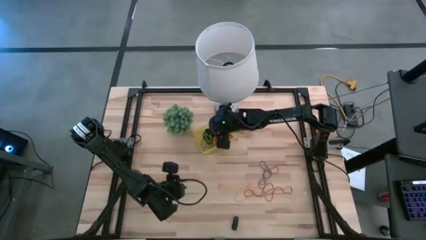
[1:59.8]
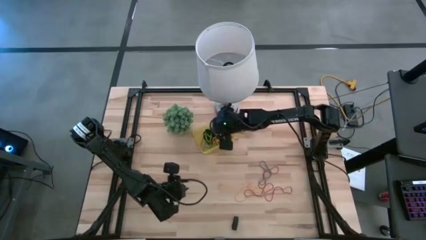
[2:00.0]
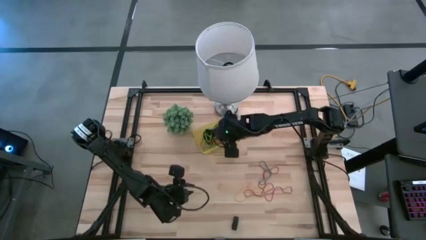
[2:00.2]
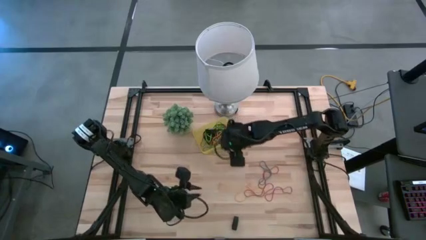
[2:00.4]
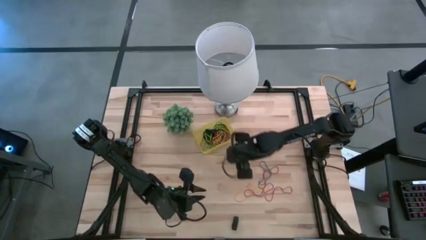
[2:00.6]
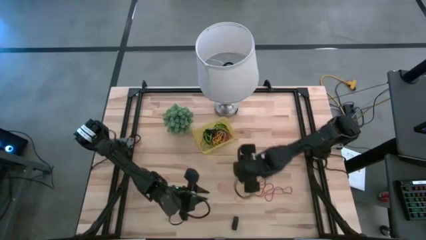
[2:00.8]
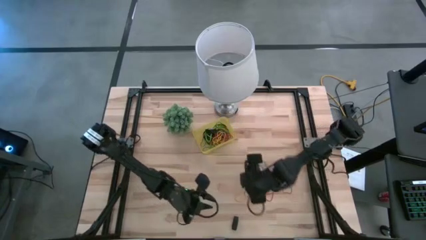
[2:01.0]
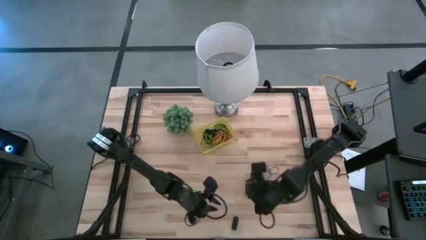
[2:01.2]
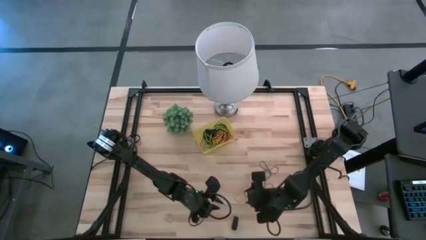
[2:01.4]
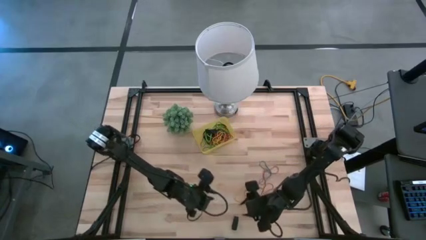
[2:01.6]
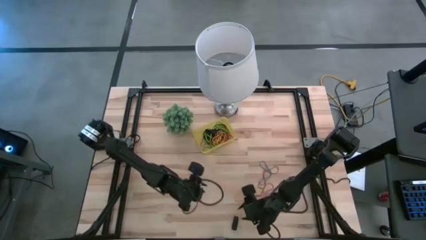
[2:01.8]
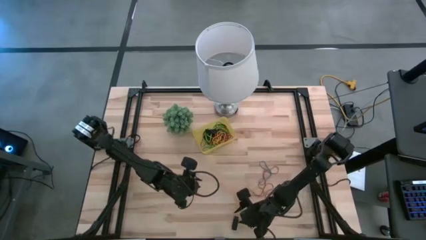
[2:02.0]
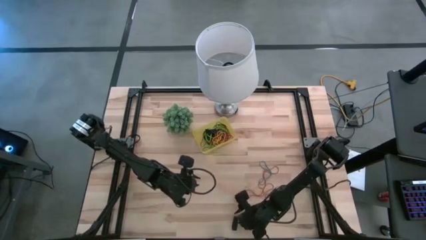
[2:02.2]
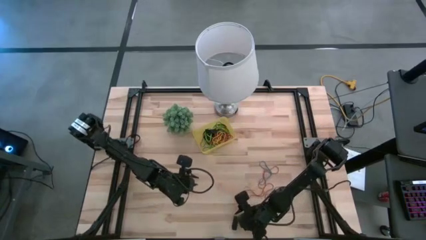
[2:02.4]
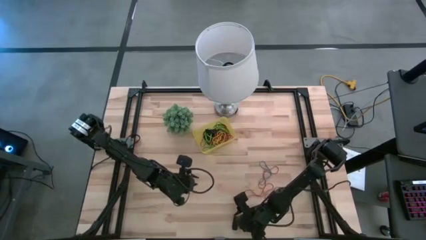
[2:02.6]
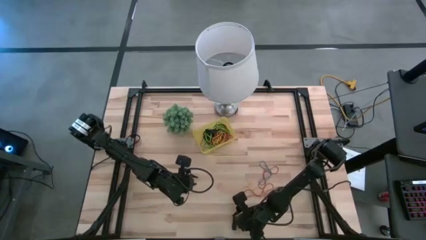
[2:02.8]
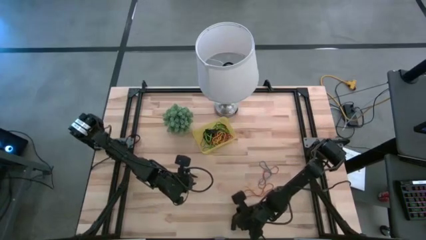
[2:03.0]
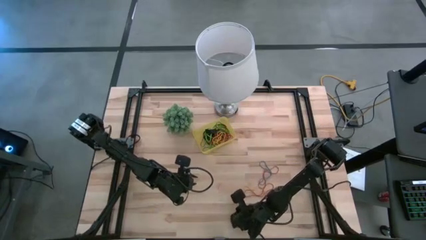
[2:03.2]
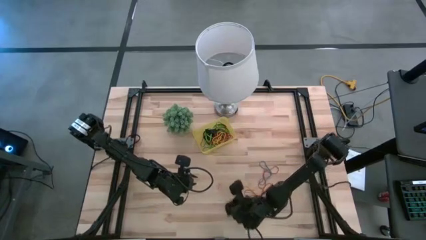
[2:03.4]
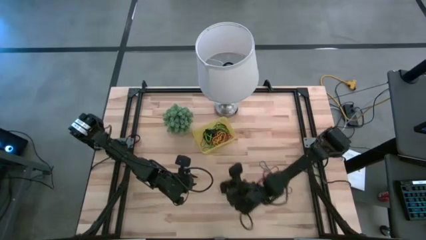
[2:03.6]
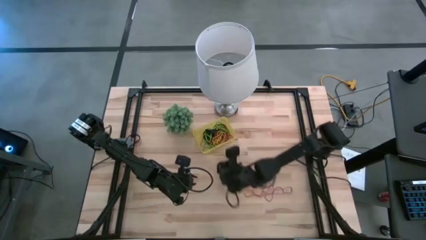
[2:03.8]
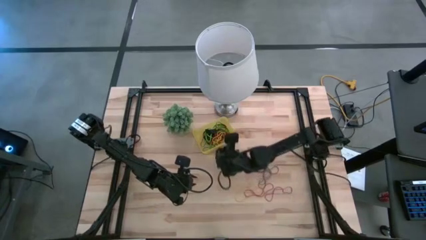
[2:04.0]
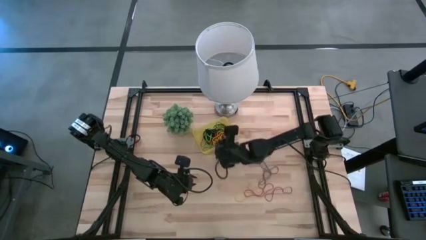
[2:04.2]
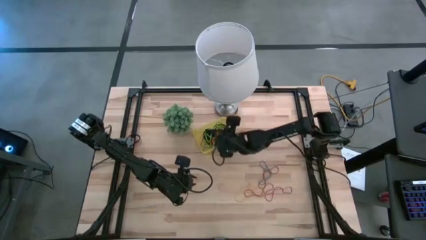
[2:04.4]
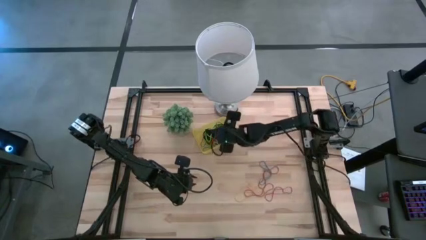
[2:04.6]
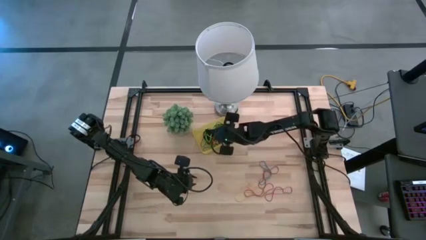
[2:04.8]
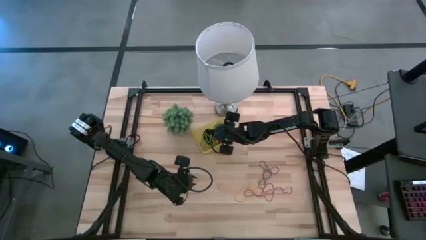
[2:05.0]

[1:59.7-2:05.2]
Task: Pick and place rubber bands into bin
Put the black rubber band into the yellow bin

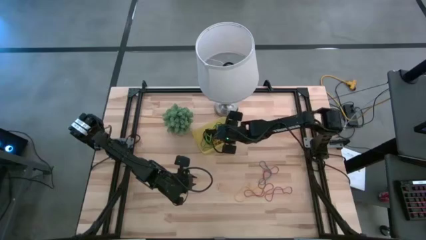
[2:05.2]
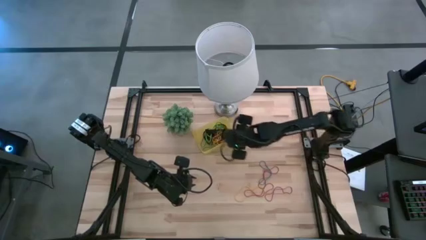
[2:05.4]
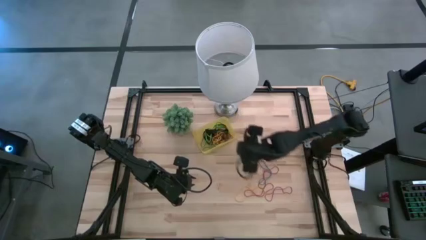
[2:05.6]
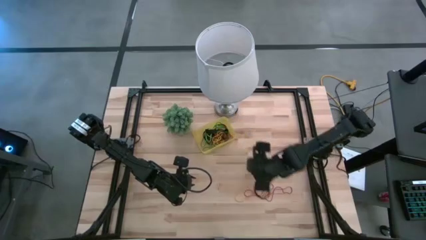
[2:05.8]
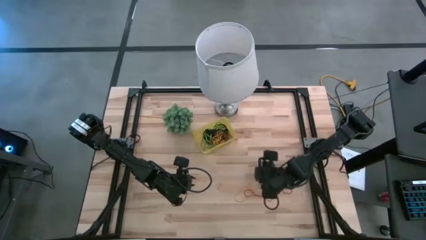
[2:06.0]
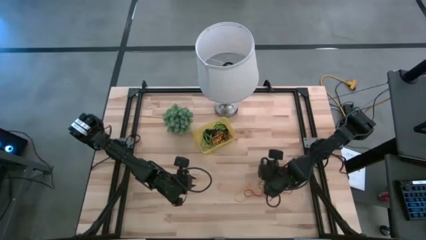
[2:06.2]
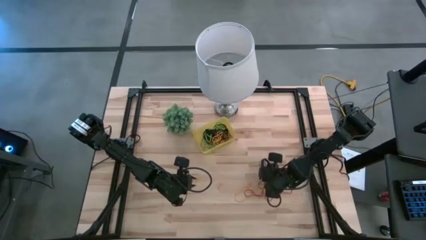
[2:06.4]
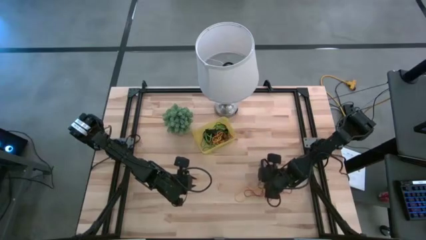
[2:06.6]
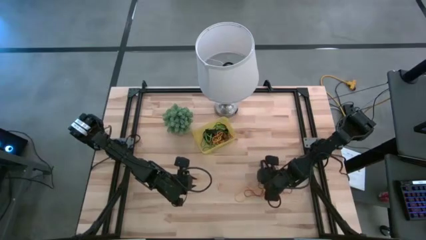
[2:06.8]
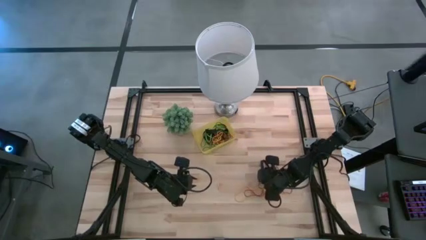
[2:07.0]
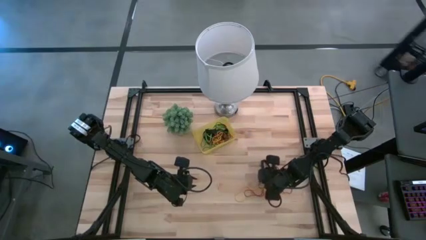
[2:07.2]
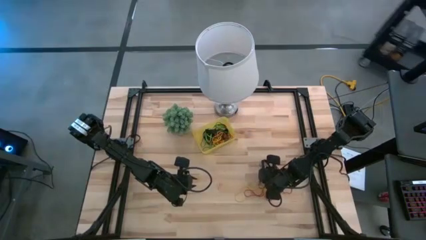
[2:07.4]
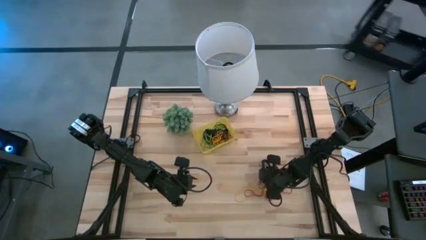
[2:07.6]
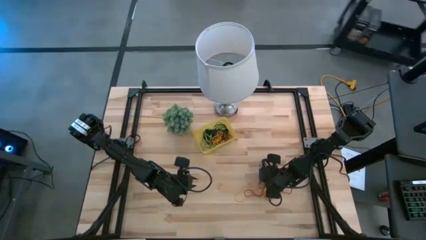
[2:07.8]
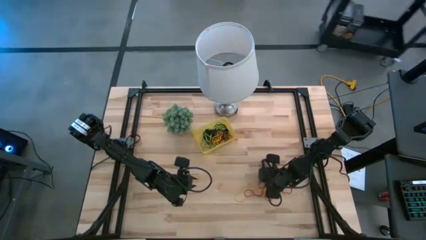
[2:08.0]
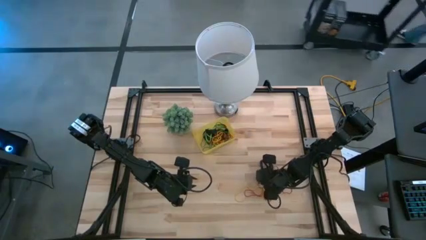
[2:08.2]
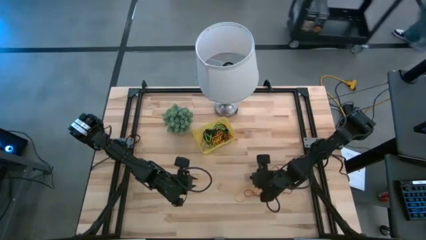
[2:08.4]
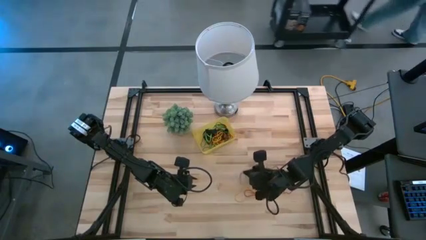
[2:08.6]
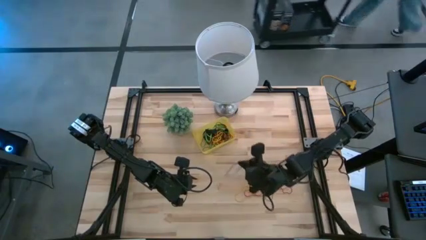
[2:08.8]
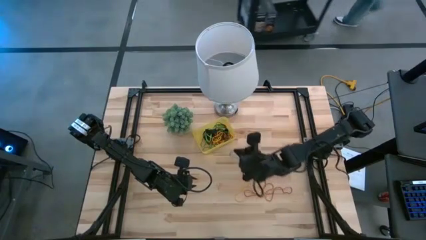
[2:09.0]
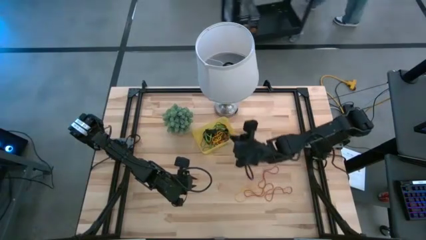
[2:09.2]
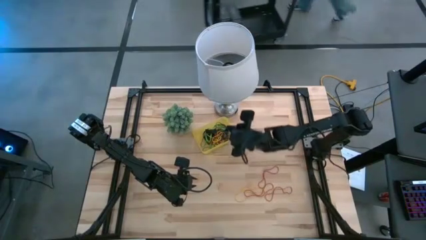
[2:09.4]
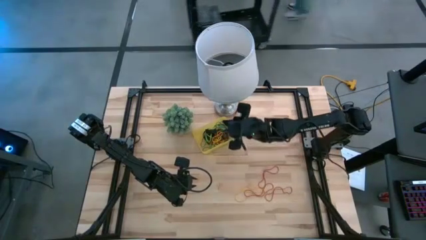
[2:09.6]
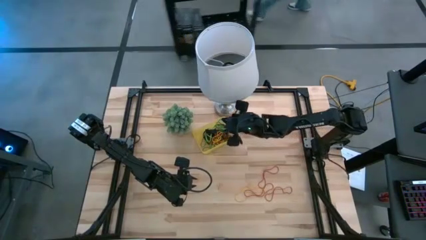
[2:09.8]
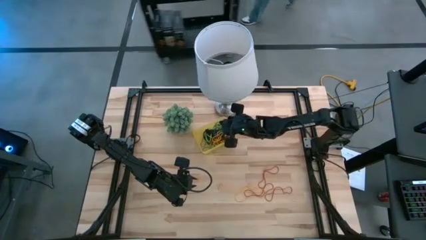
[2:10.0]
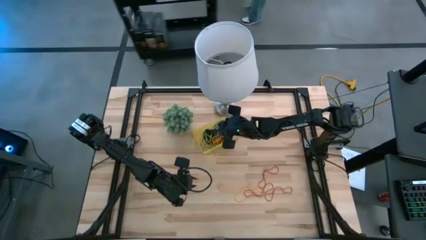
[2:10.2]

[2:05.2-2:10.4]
Put the blue rubber band into the yellow bin

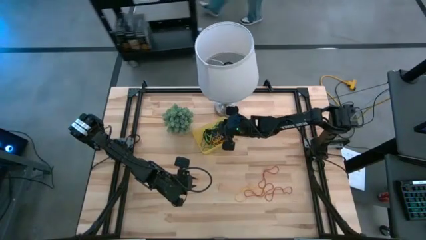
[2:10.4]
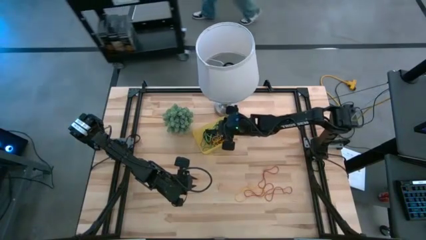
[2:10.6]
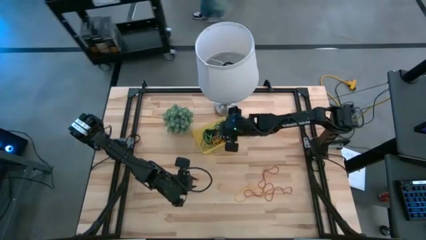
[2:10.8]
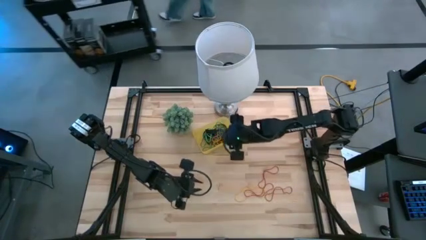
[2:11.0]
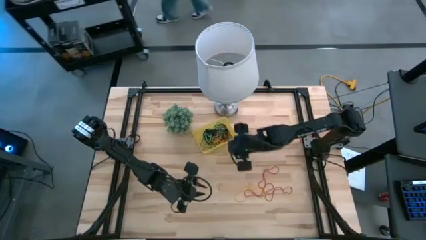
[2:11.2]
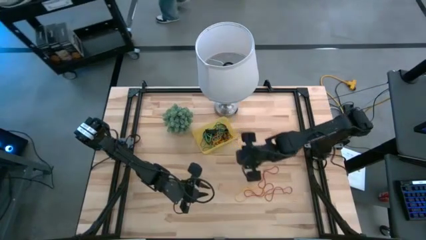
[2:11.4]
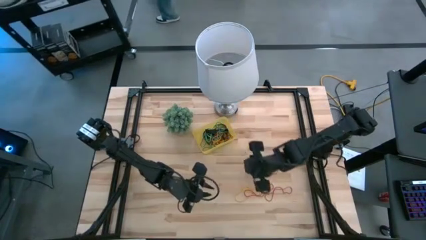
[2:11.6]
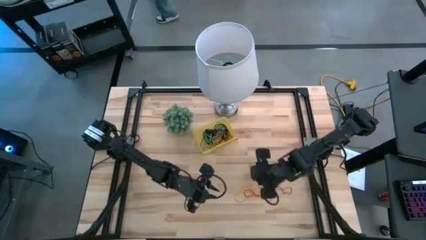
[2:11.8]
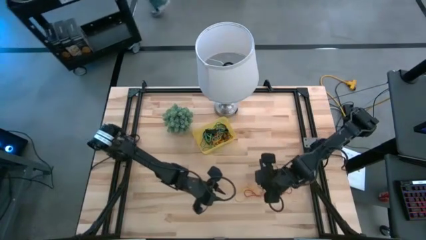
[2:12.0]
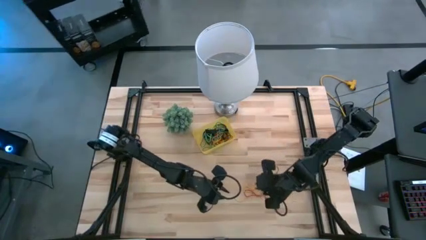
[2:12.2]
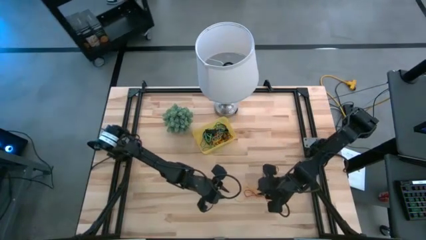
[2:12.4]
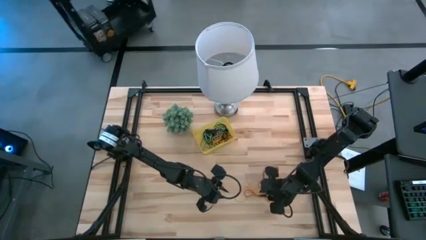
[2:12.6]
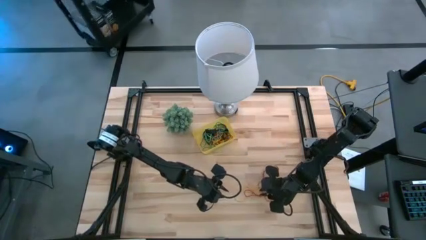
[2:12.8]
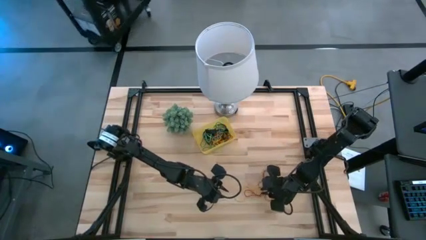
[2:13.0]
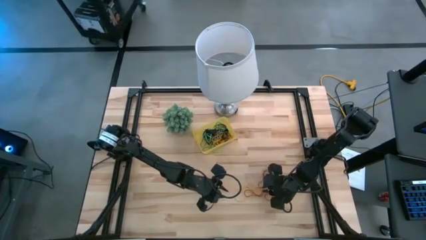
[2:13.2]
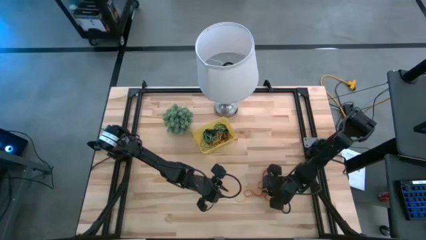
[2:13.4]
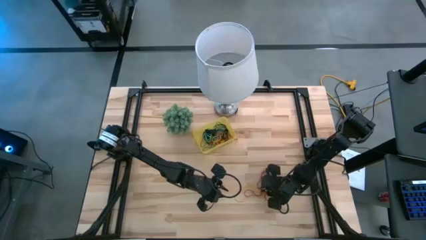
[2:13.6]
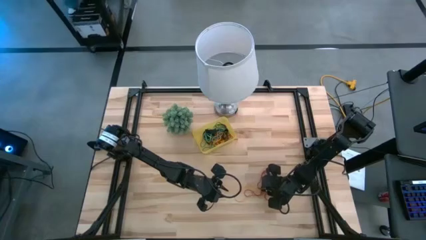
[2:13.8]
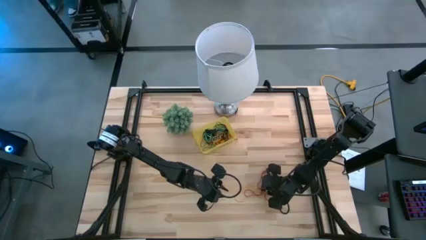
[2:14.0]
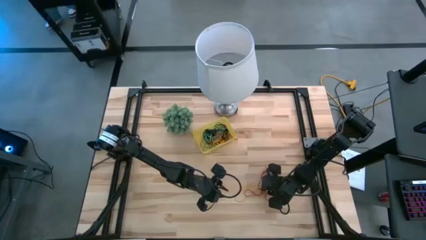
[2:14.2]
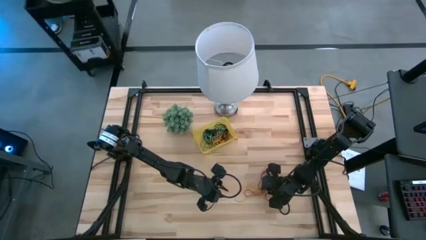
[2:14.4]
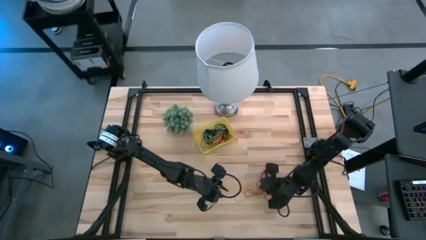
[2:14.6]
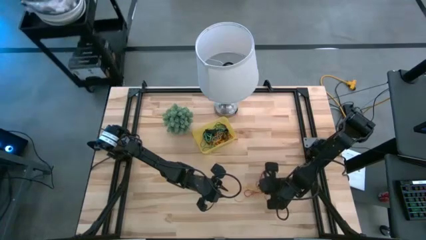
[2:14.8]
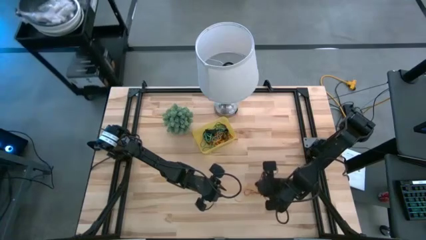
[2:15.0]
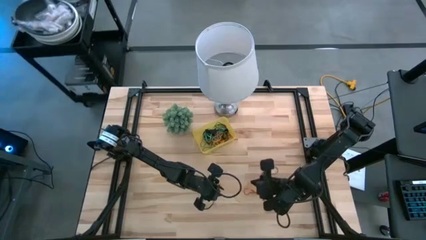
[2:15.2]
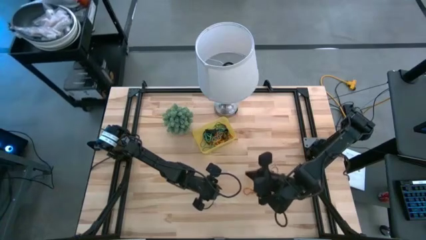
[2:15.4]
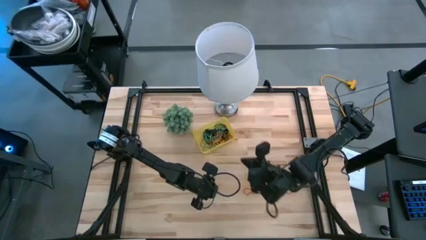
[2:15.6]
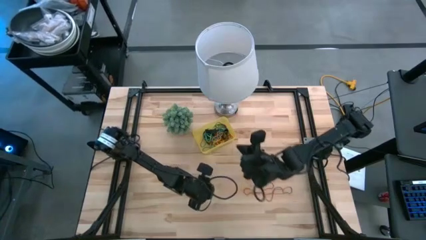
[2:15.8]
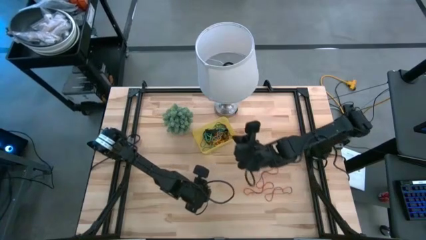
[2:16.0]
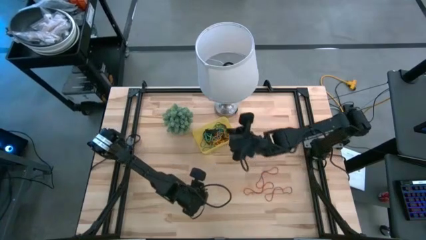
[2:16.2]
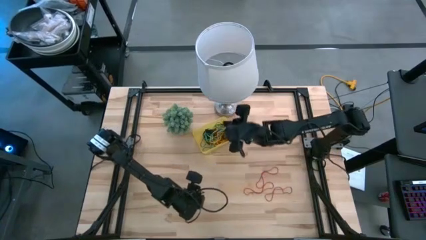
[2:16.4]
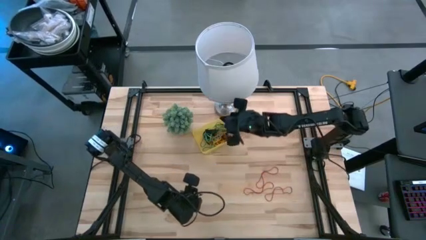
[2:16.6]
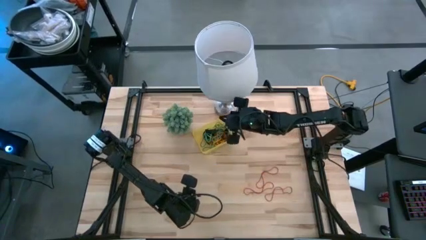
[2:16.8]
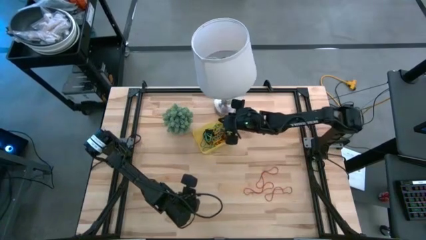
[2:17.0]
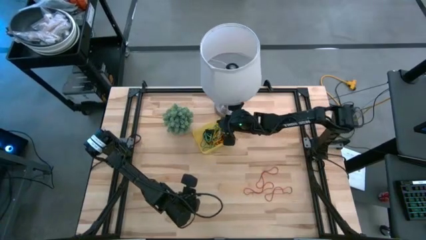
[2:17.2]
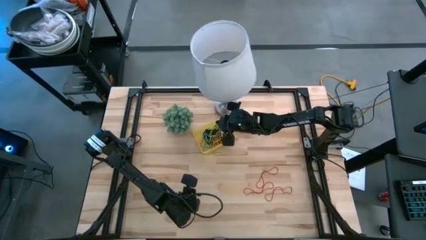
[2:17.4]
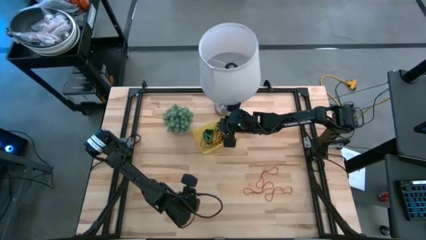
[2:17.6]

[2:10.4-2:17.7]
Put the yellow rubber band into the yellow bin
